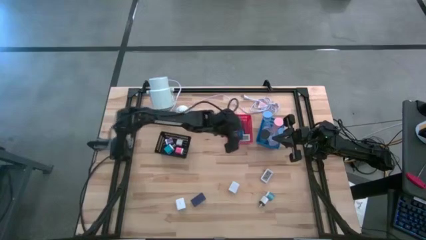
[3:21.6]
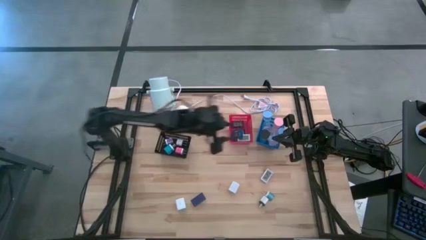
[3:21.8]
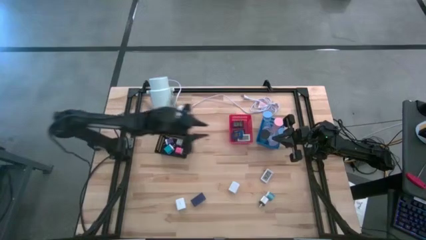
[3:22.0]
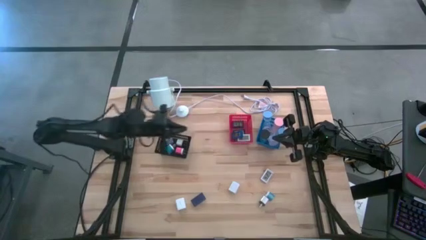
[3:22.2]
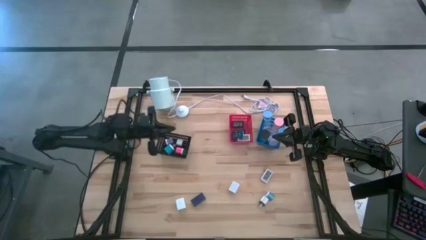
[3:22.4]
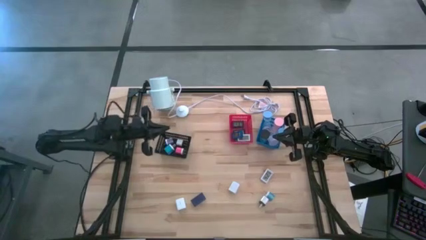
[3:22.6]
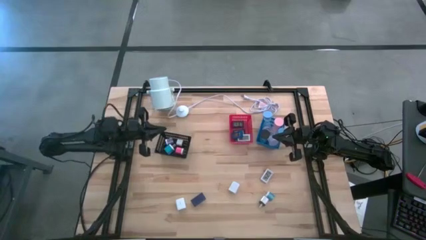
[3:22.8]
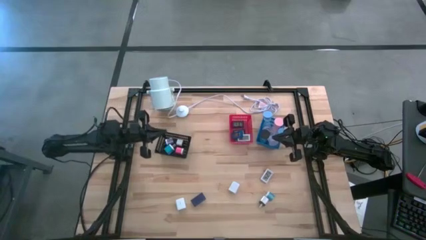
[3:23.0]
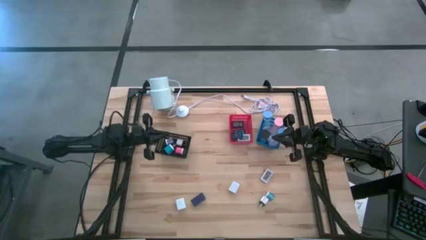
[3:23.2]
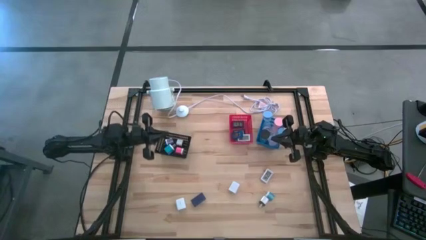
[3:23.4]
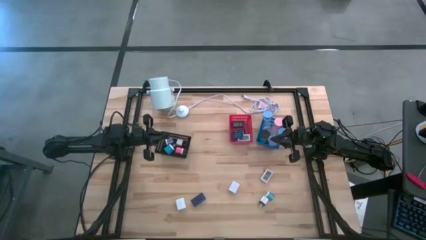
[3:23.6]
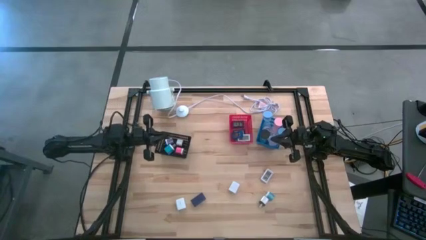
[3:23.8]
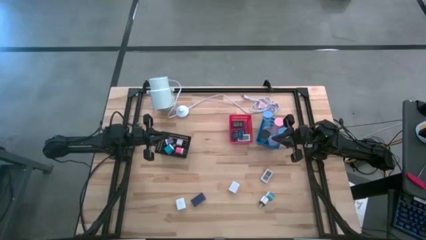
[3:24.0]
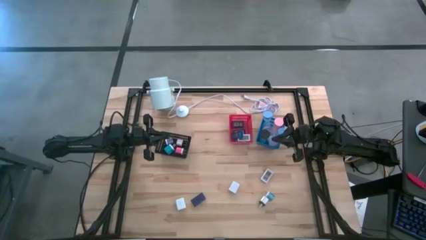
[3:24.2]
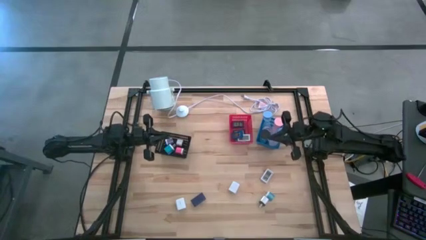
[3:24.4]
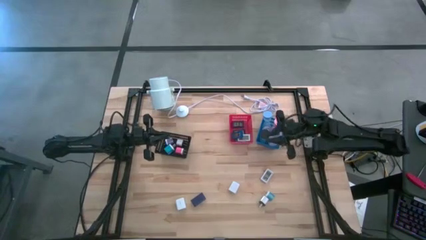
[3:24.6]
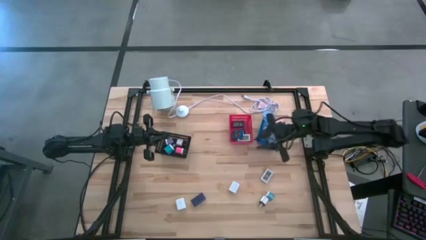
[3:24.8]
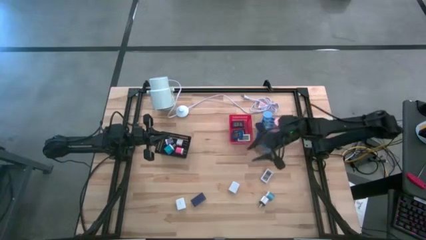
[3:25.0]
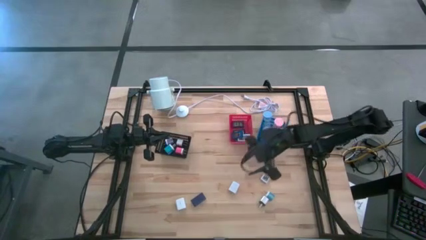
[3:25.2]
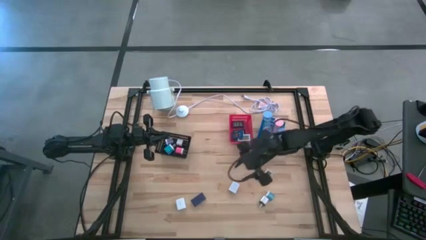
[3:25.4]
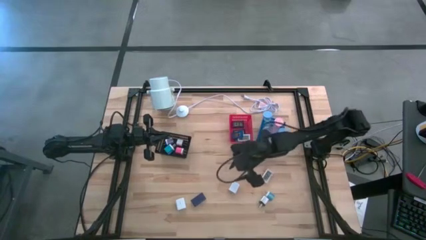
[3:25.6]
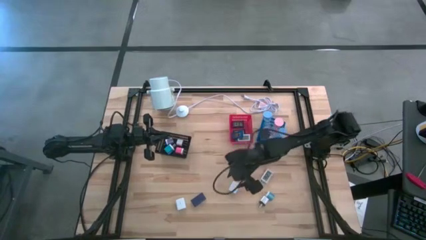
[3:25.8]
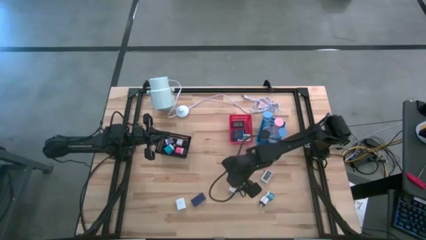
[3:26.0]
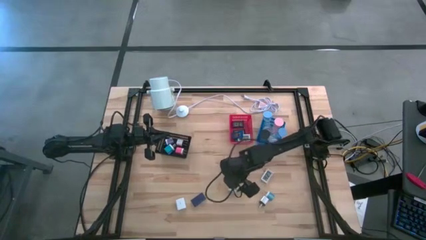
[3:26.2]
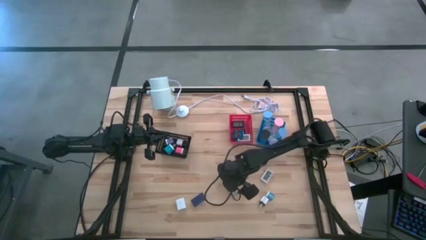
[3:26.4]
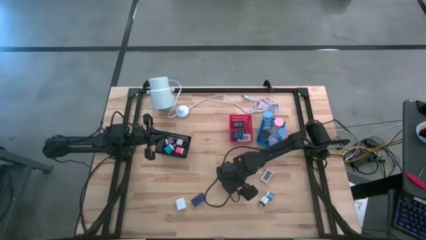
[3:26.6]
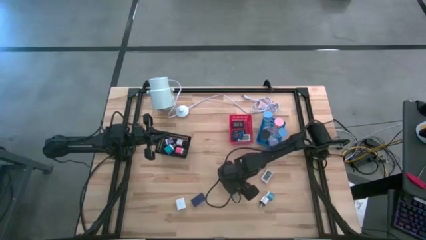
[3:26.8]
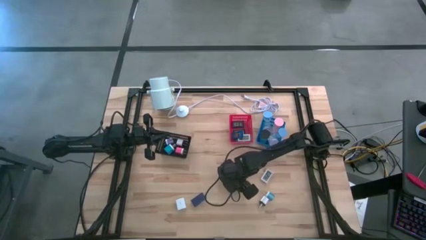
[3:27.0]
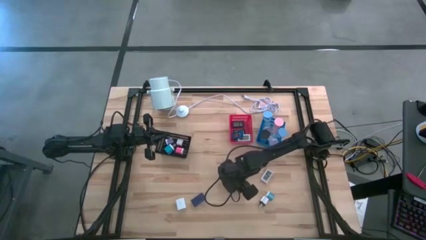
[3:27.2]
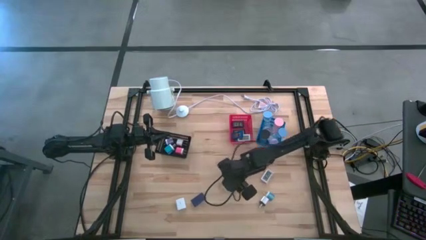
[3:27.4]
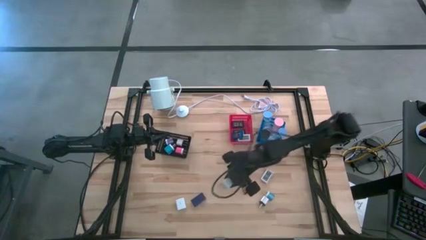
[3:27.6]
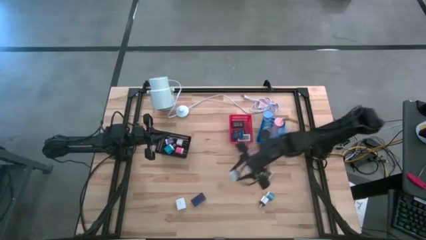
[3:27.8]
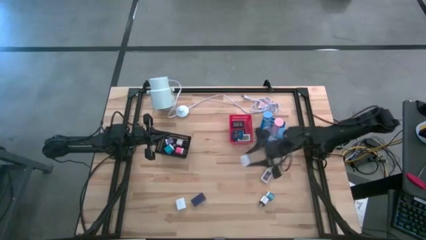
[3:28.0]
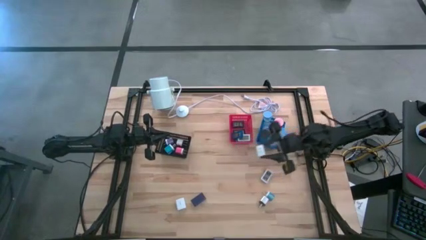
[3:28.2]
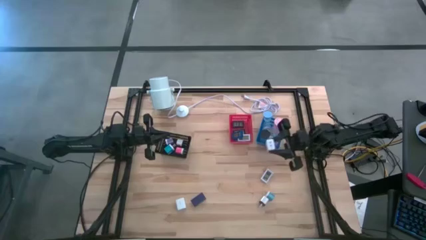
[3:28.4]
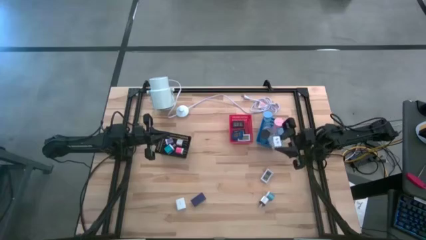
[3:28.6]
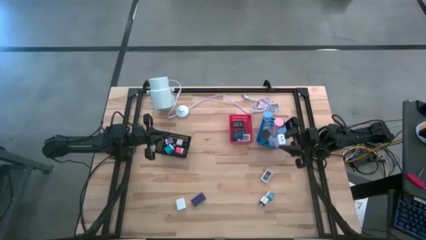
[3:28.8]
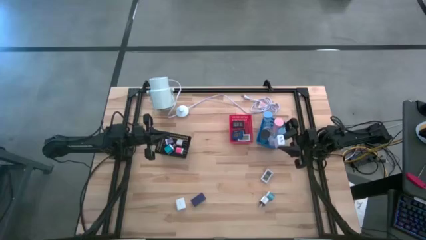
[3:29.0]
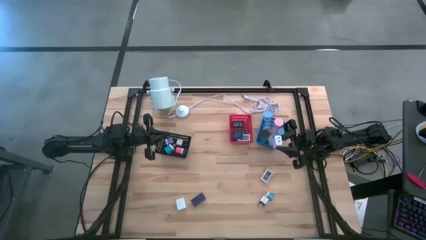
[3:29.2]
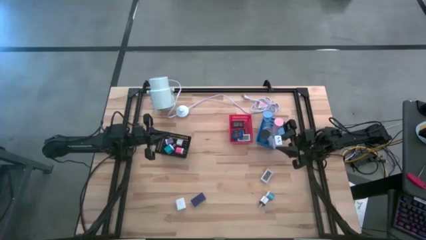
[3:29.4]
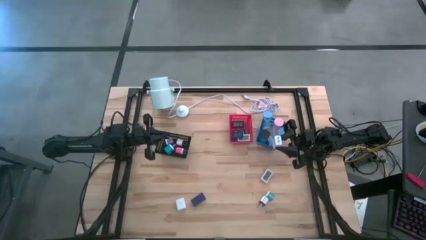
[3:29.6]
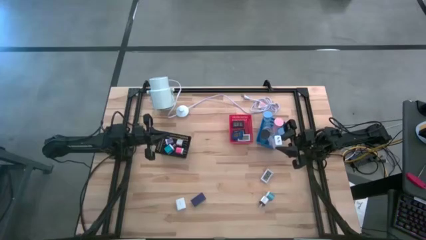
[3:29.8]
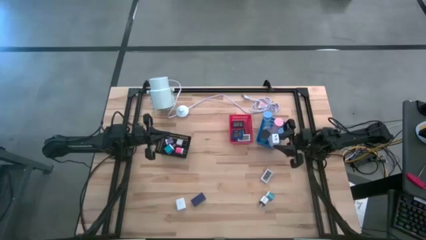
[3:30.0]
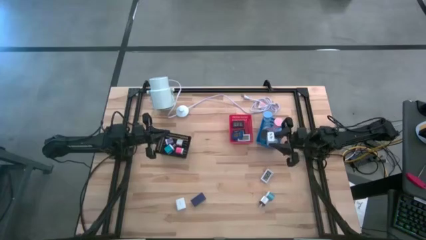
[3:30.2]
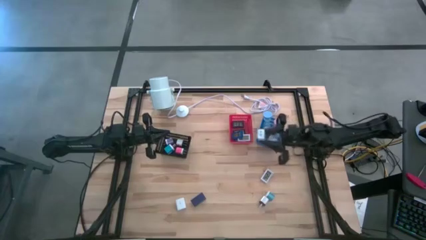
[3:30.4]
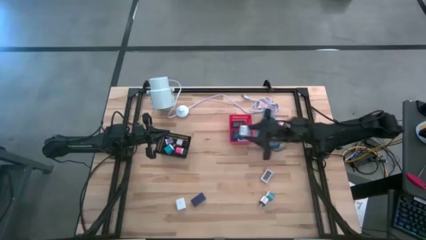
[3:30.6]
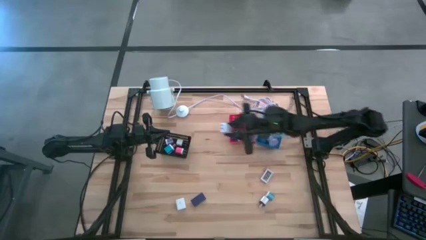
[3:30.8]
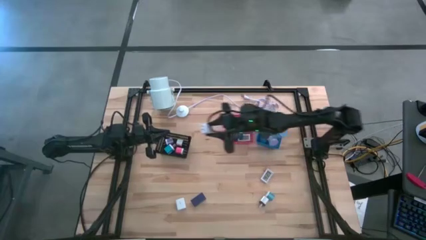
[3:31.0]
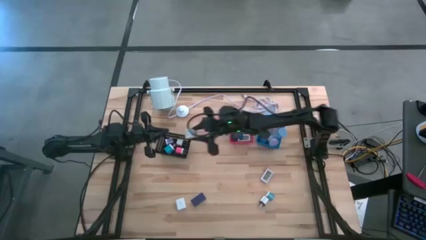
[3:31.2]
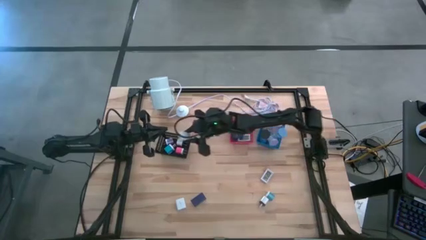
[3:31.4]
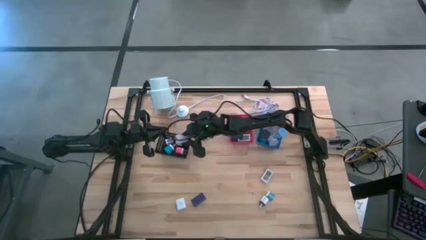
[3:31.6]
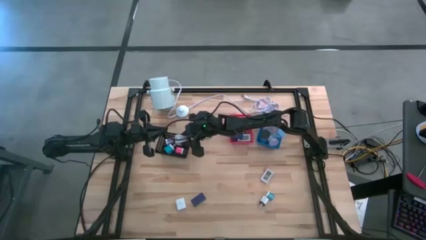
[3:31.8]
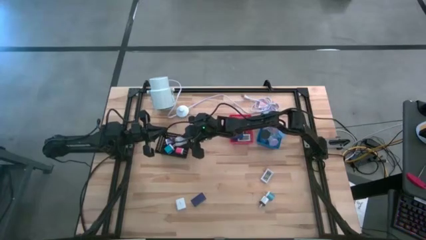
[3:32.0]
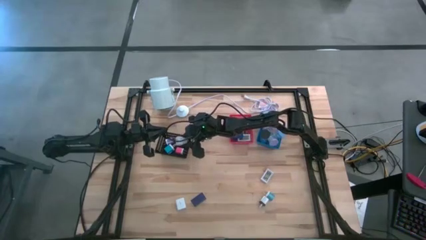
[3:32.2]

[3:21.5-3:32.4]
Task: Pick & Place Office items
Put the right white charger adaptor into the black bin

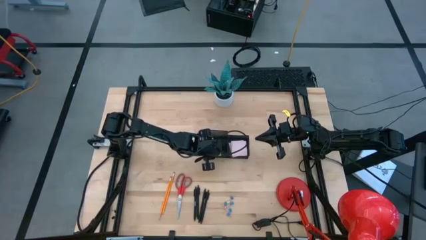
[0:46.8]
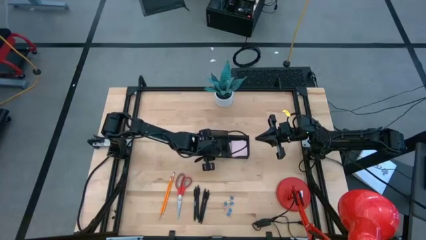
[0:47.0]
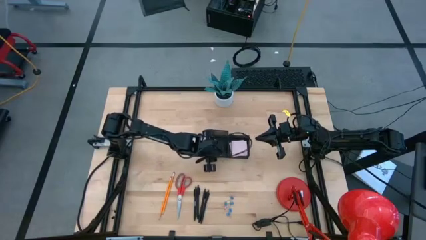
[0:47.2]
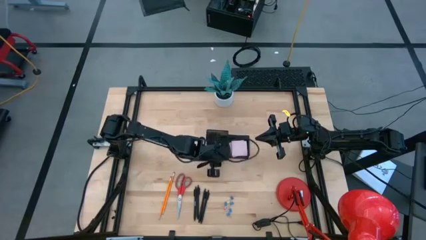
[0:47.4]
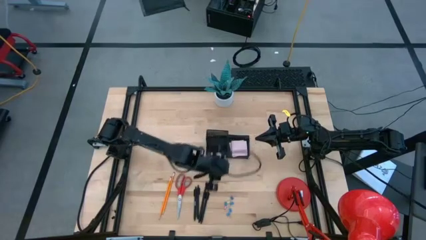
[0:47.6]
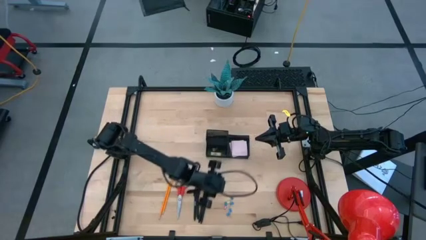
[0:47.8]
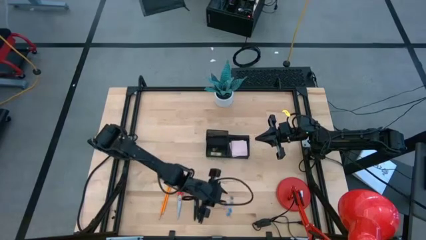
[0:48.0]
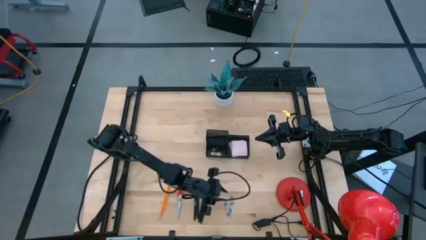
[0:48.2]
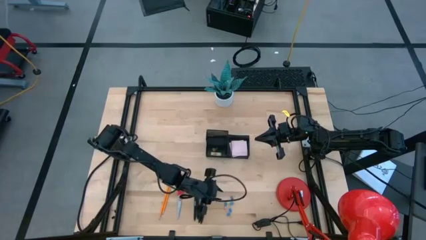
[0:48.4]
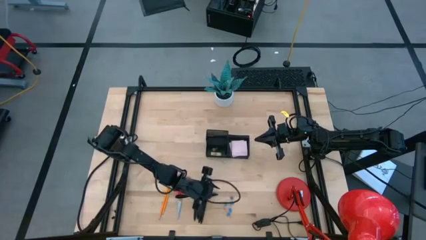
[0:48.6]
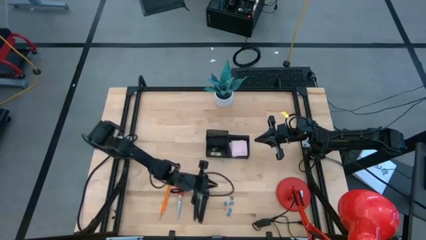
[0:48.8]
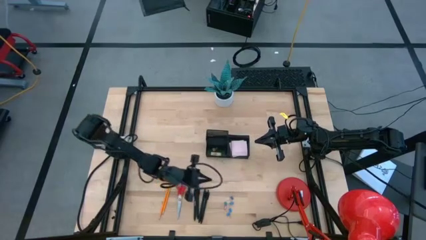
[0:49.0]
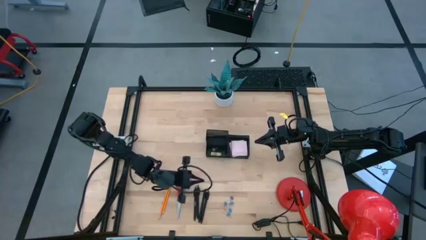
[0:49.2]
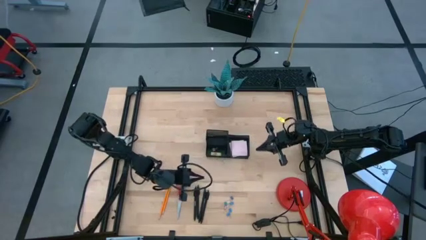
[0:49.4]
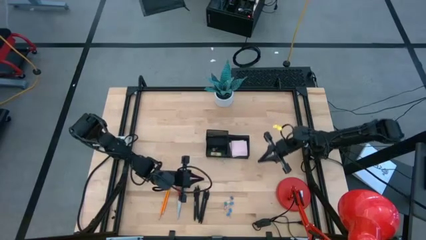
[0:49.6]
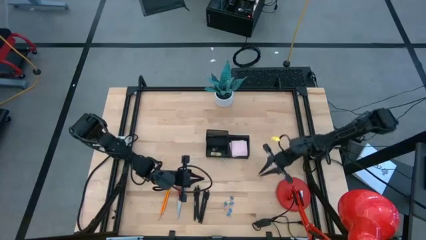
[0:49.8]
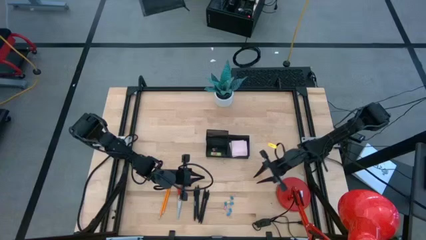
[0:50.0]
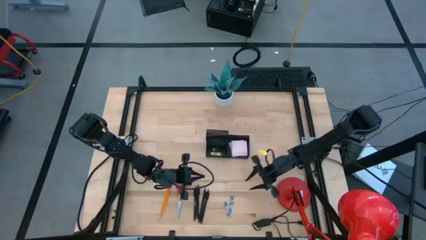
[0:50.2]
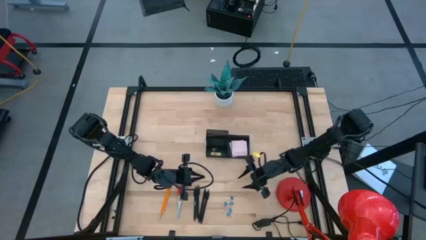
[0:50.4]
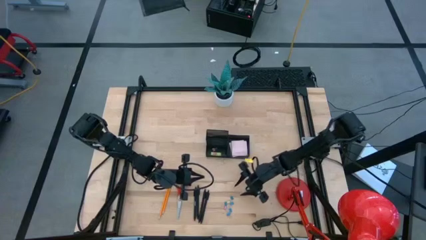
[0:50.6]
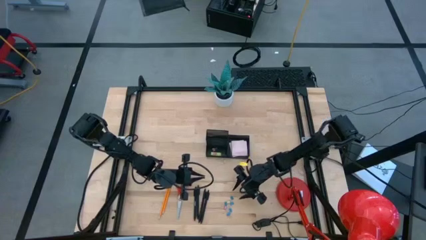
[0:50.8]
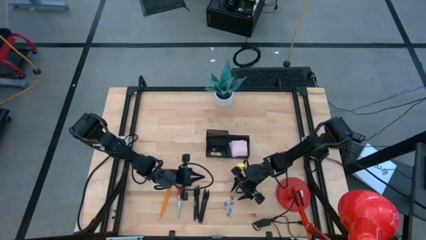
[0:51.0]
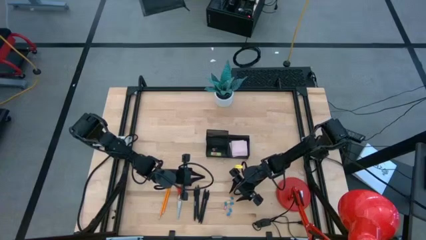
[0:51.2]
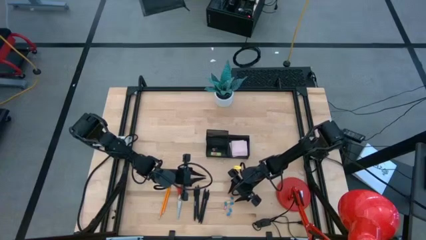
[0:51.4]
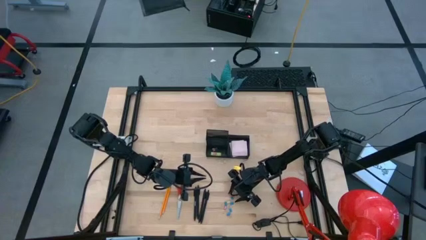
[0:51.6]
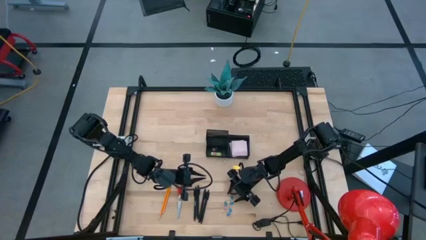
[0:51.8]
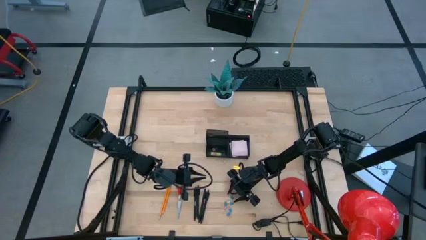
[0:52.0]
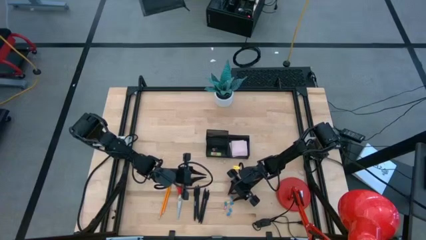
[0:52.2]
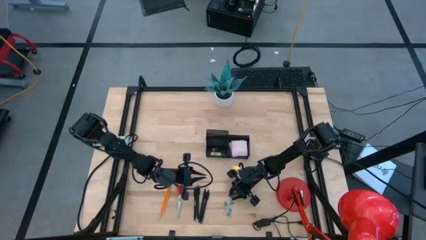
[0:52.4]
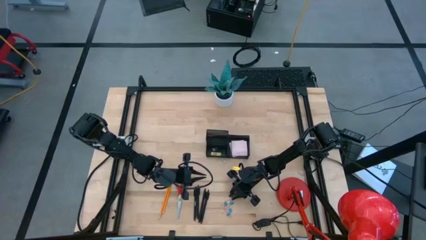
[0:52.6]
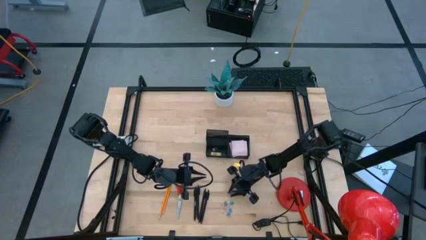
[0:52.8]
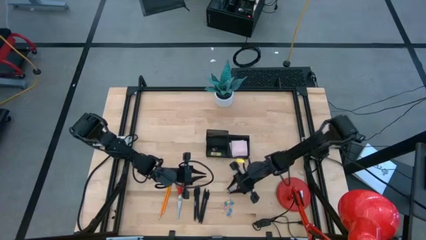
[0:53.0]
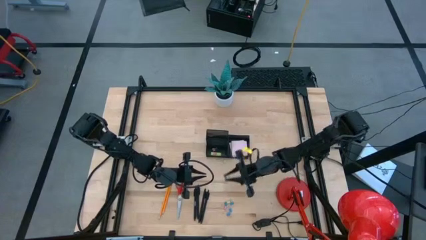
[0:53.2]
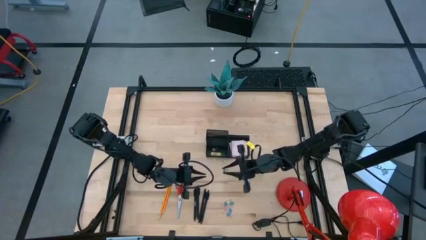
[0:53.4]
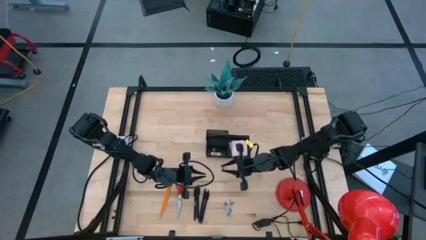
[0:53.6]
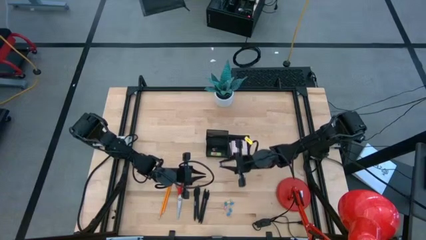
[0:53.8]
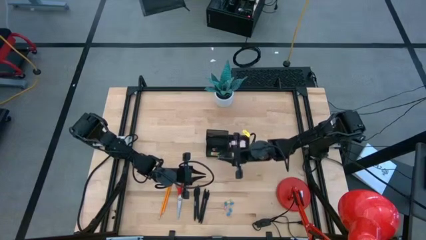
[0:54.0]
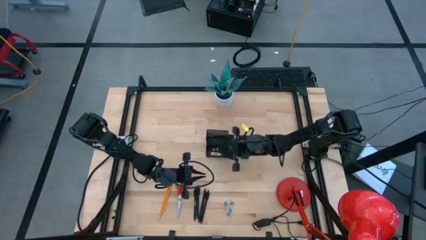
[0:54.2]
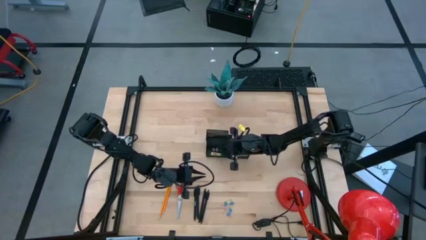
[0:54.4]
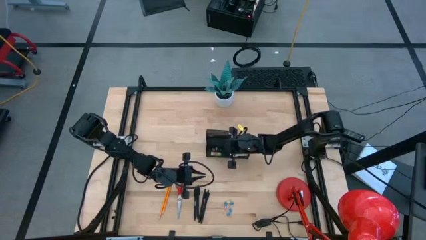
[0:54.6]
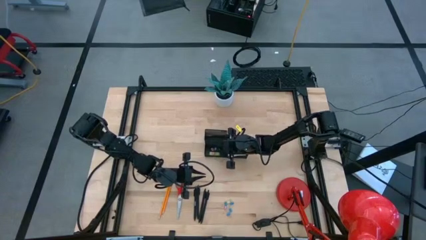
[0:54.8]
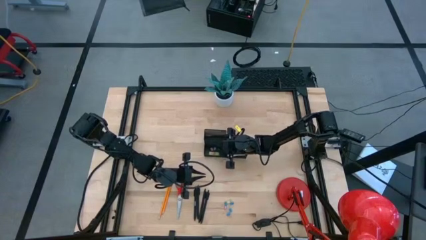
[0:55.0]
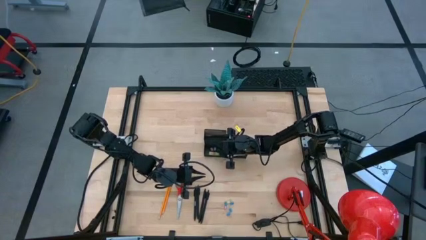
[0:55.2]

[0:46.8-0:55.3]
Task: Pick and place office supplies into organizer
Put the blue binder clip into the black desk organizer
